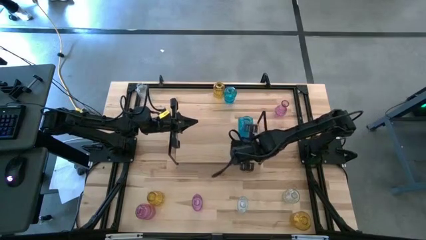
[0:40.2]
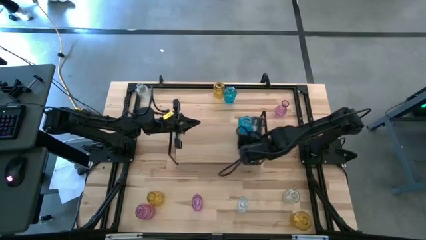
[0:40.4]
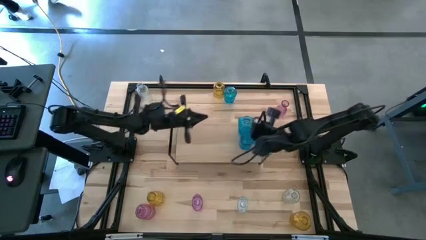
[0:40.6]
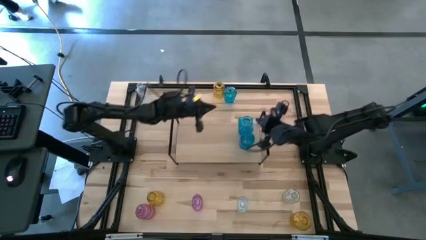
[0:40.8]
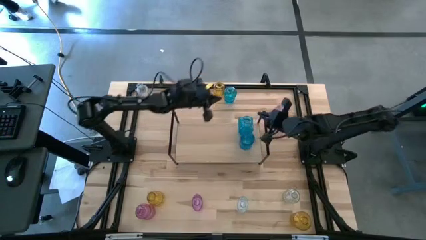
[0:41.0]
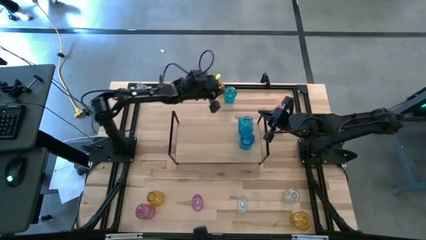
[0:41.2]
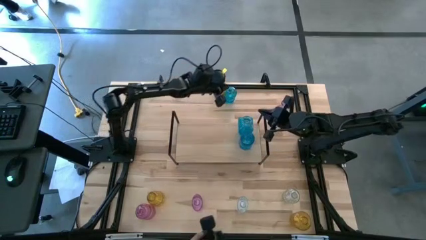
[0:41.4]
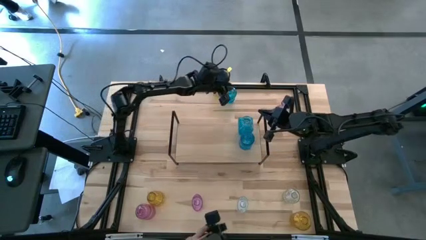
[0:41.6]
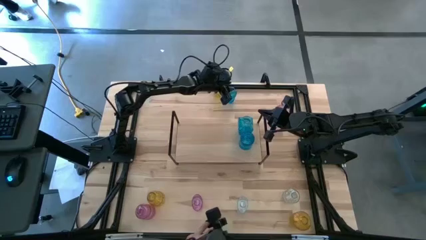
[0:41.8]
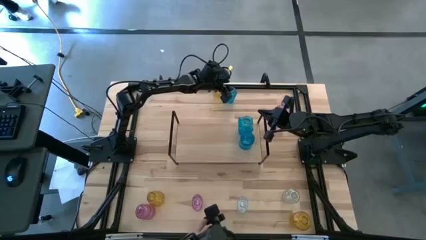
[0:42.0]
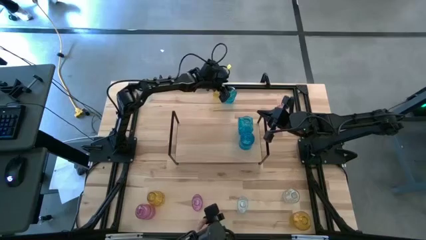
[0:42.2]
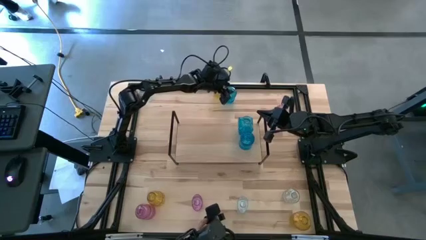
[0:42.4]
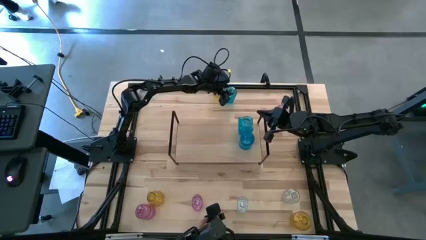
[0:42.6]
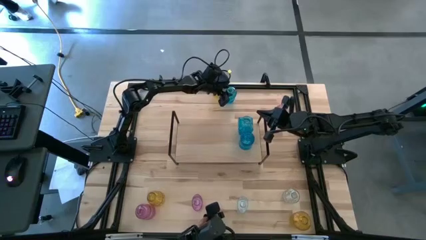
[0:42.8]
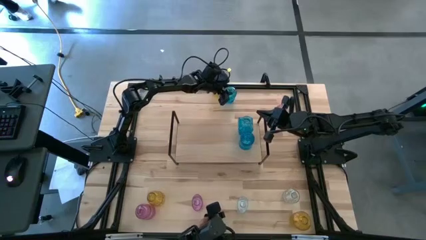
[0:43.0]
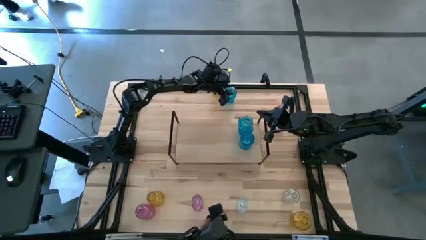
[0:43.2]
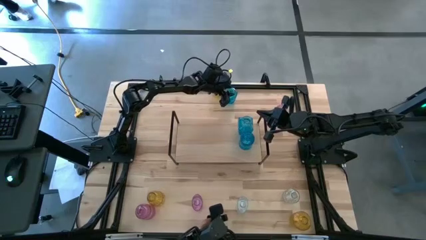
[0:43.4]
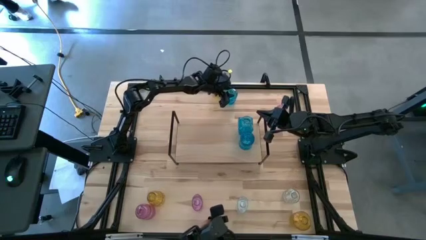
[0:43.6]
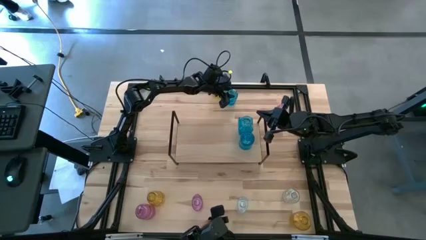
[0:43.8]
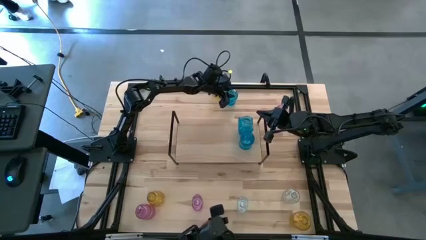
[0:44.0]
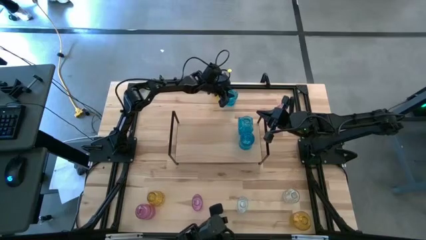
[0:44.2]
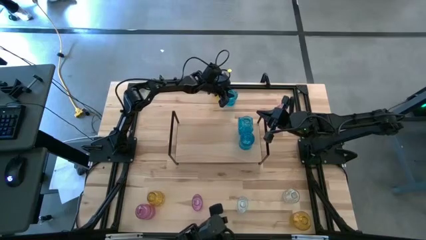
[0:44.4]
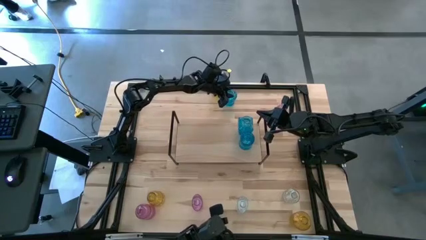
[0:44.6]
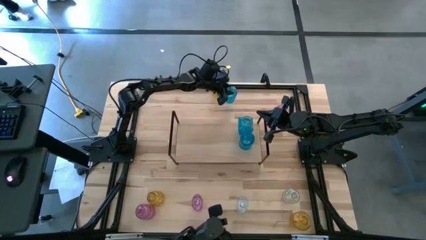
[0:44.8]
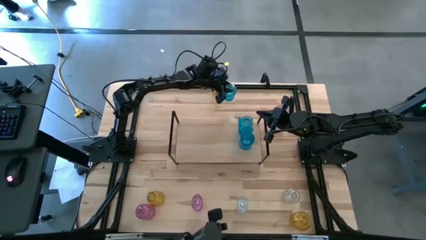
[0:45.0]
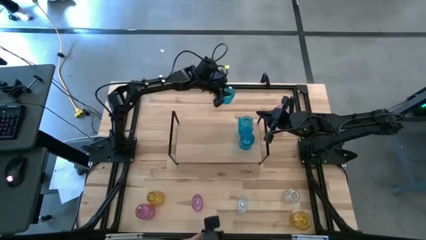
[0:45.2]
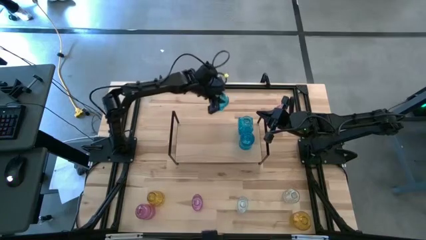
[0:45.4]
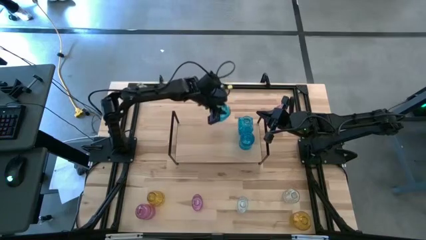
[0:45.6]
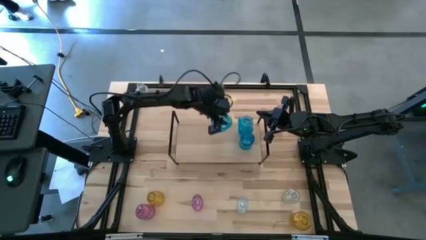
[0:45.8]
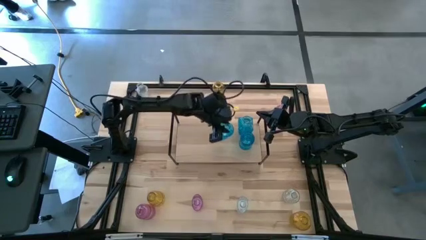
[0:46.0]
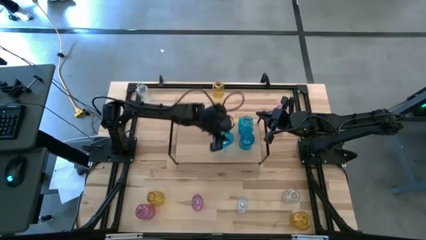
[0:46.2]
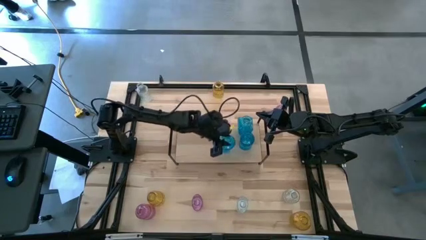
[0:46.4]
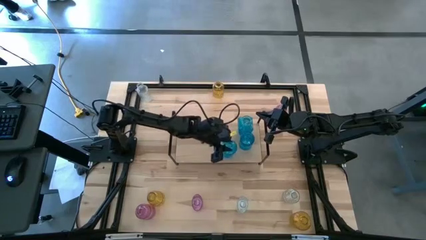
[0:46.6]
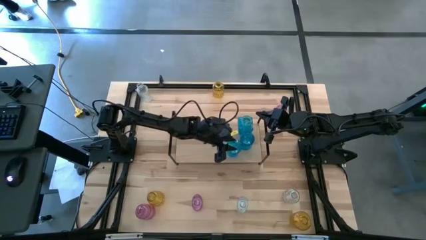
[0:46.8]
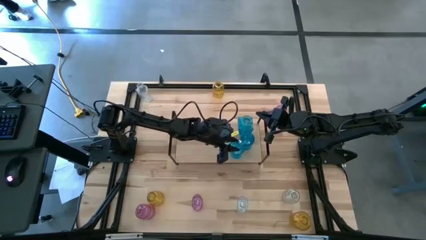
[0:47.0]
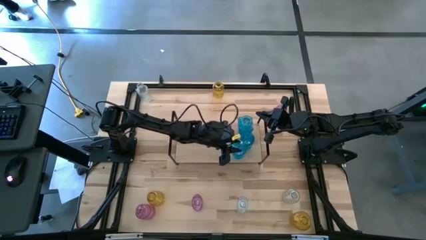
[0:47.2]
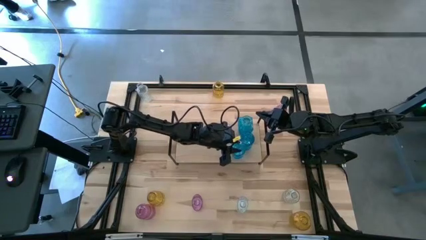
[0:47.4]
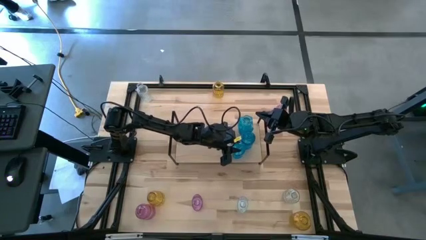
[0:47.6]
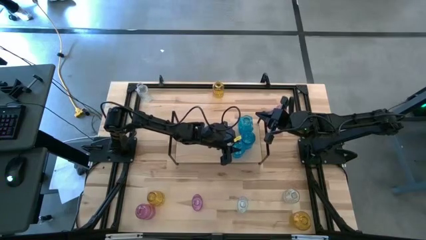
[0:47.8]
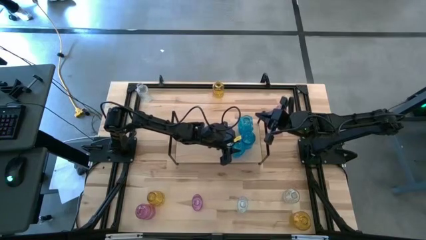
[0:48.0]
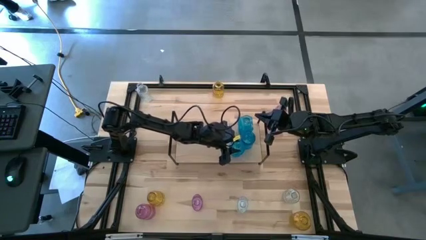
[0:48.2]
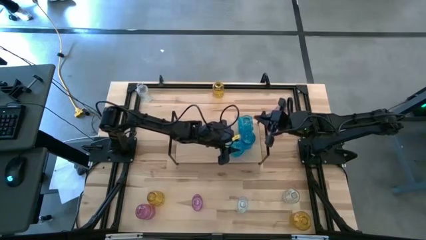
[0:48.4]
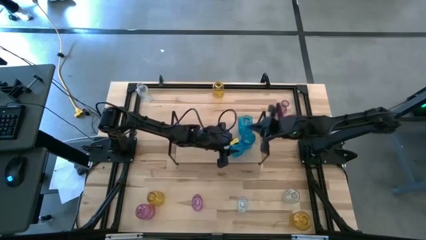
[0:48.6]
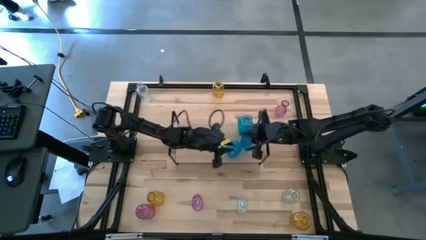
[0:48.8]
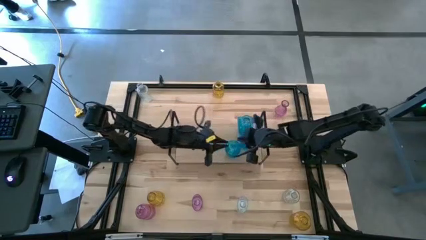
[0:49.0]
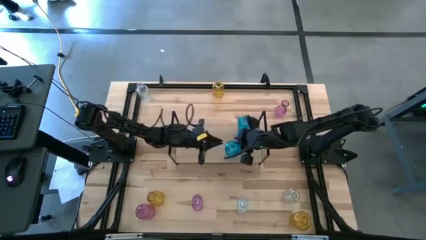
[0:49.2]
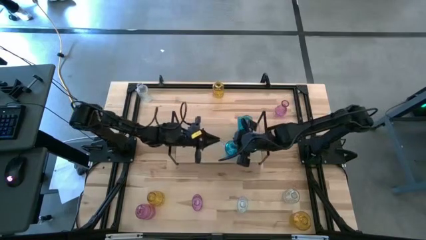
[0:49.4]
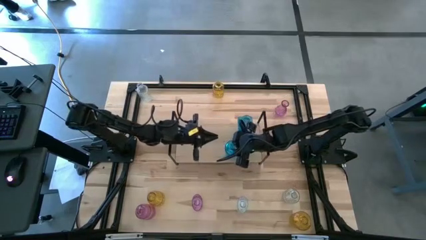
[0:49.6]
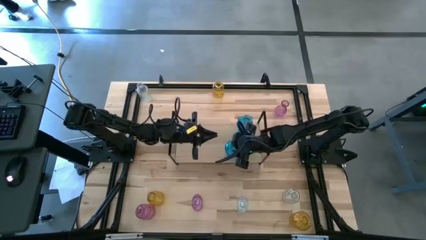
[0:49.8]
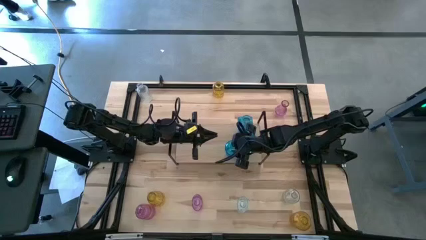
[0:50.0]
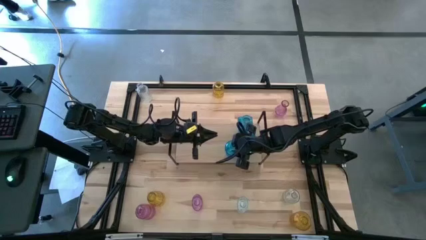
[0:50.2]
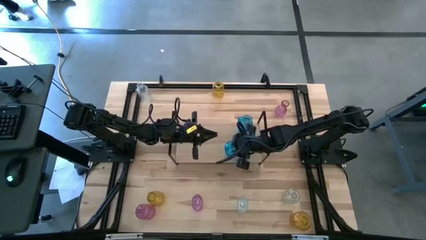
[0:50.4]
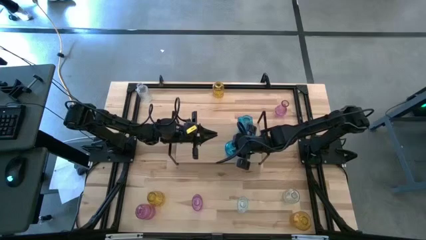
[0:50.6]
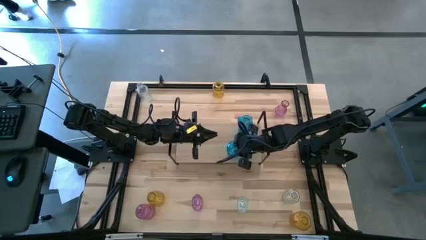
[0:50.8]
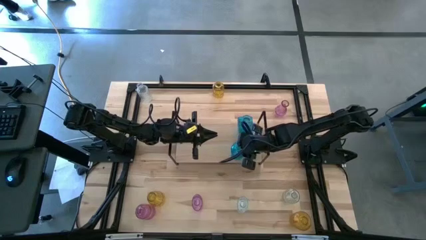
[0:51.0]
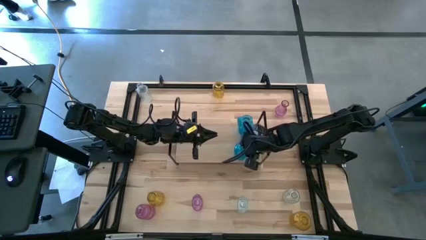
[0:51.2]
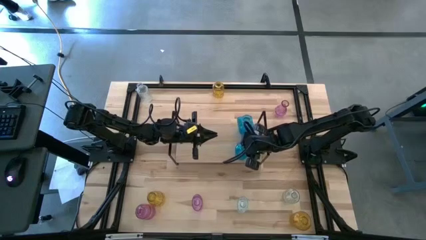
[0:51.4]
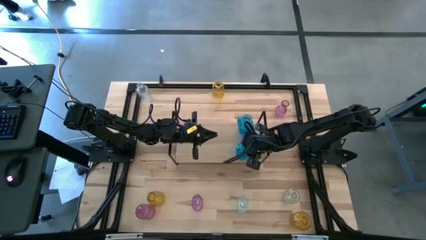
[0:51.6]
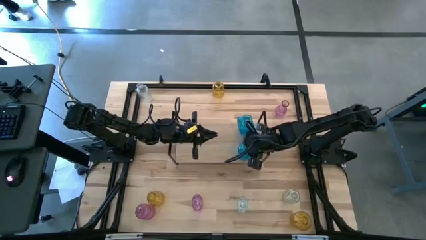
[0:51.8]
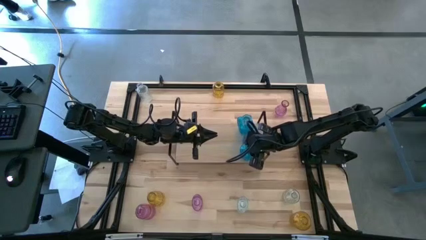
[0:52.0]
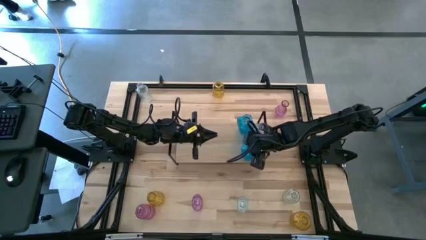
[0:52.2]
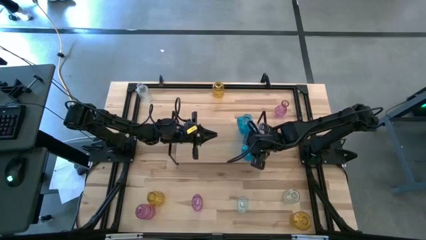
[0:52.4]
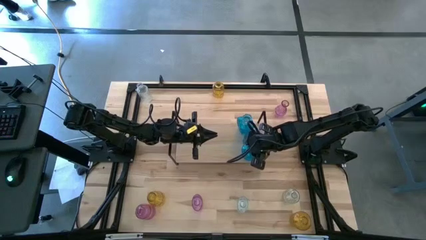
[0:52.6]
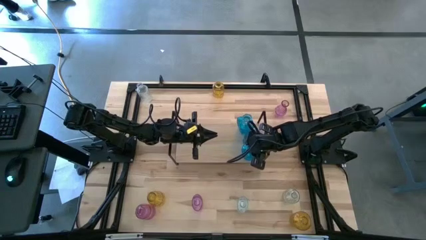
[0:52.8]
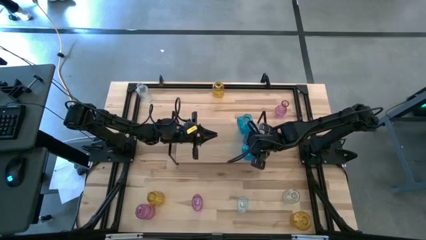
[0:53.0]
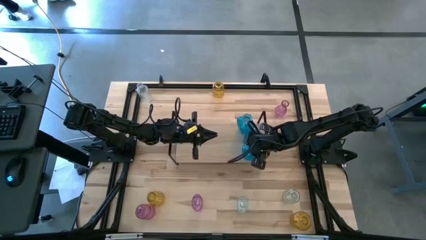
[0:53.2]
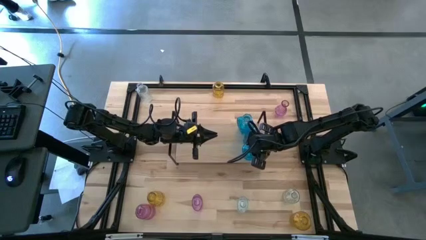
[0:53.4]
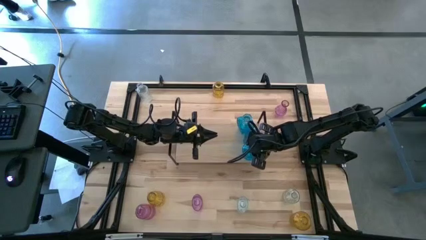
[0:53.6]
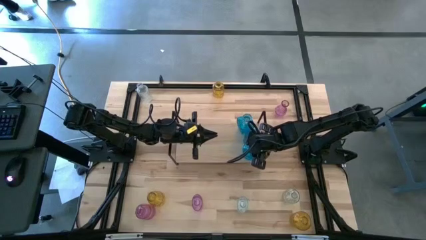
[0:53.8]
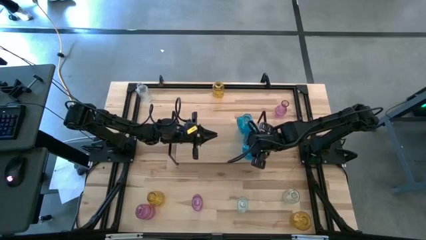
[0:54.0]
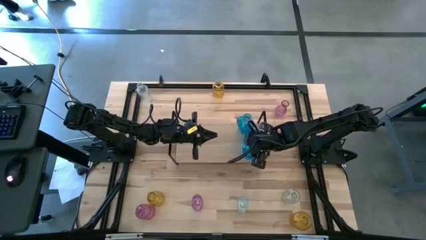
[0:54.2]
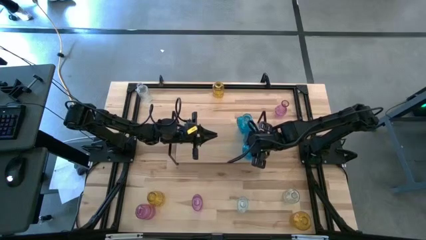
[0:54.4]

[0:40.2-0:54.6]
Task: sort vases onto shelf
Put the blue vase aligned with the other blue vases on the shelf
